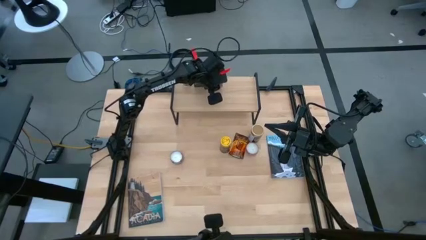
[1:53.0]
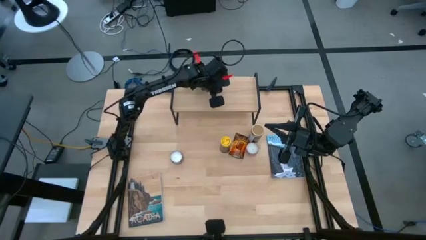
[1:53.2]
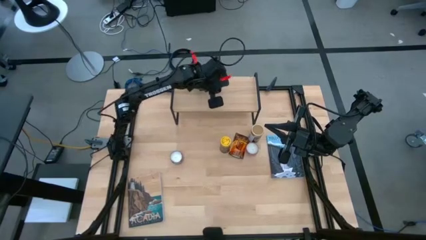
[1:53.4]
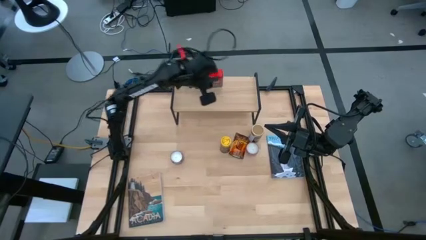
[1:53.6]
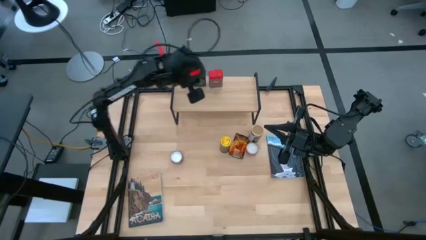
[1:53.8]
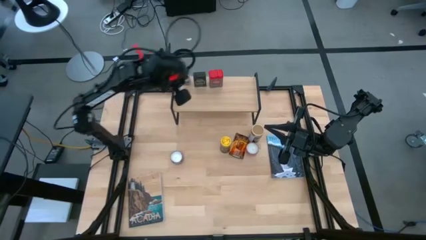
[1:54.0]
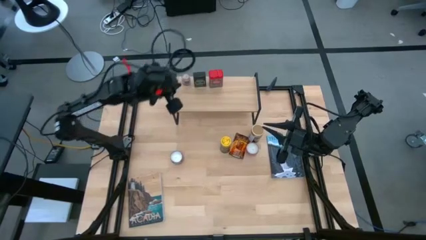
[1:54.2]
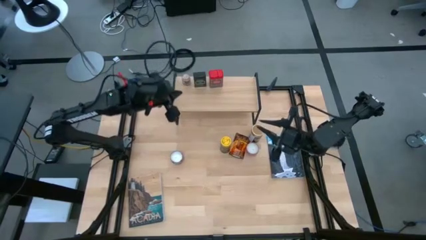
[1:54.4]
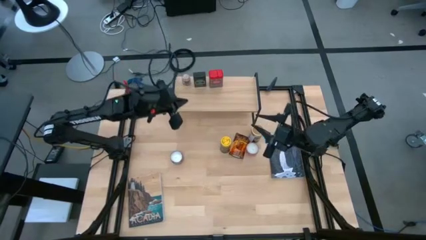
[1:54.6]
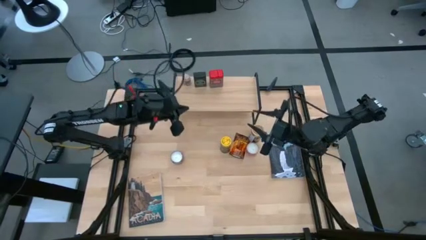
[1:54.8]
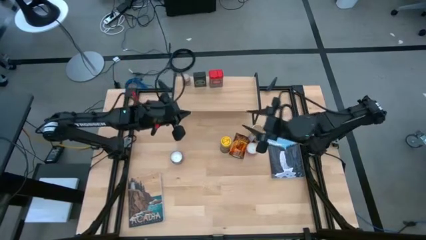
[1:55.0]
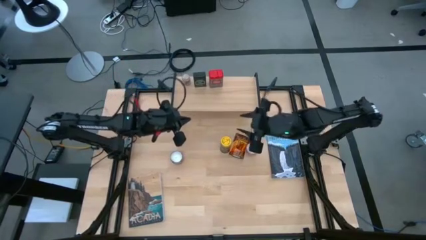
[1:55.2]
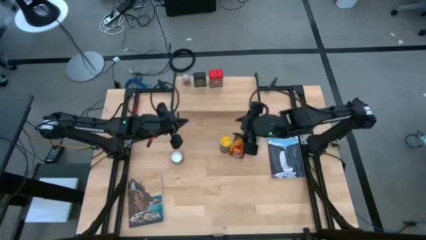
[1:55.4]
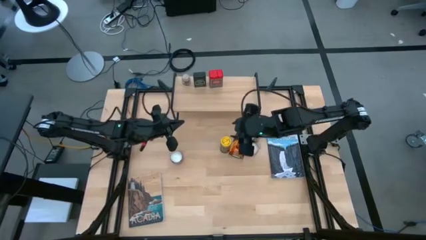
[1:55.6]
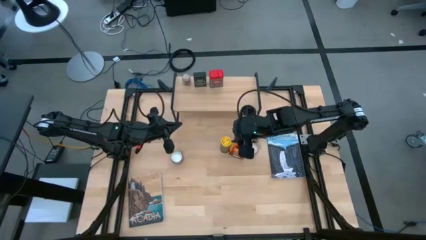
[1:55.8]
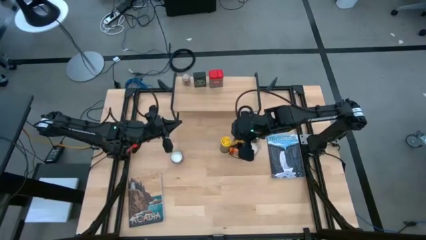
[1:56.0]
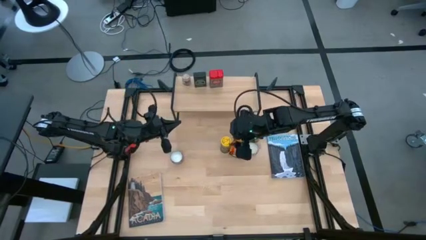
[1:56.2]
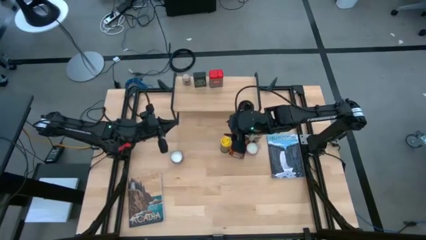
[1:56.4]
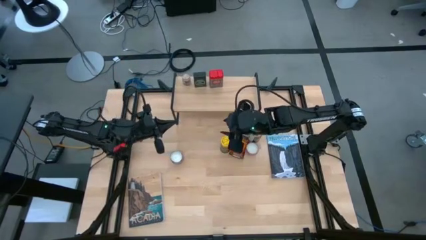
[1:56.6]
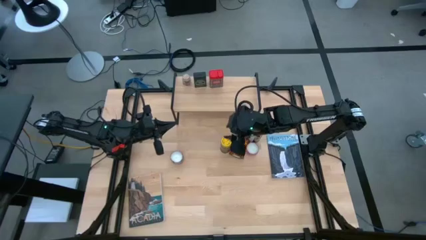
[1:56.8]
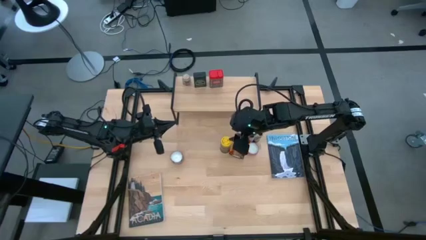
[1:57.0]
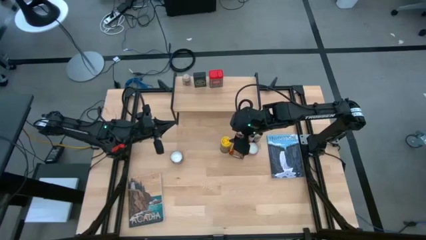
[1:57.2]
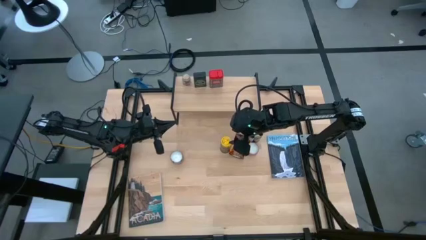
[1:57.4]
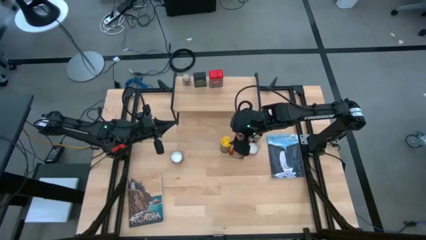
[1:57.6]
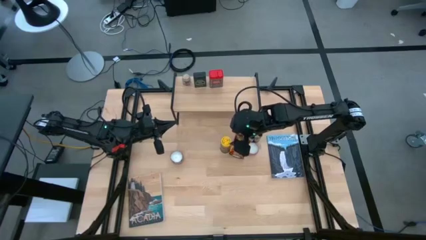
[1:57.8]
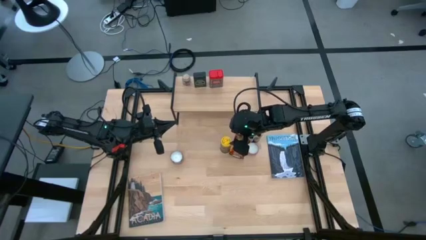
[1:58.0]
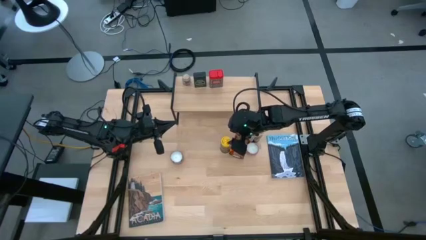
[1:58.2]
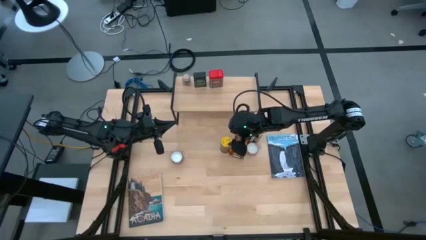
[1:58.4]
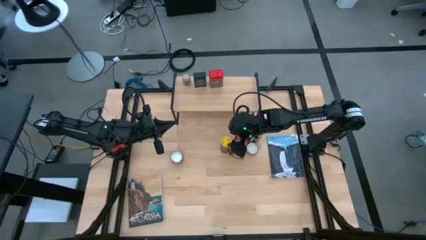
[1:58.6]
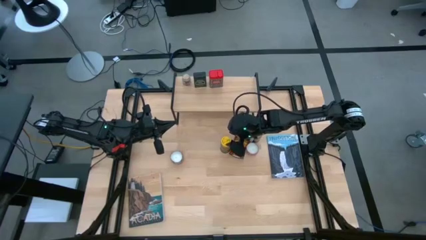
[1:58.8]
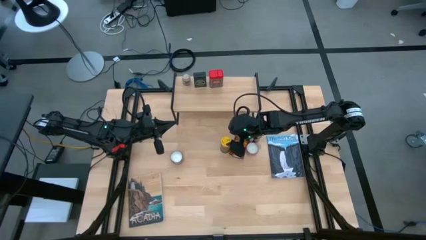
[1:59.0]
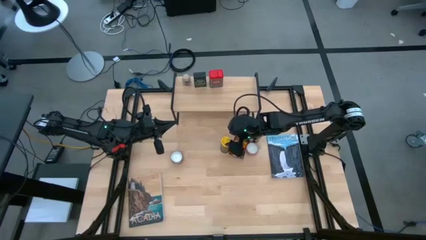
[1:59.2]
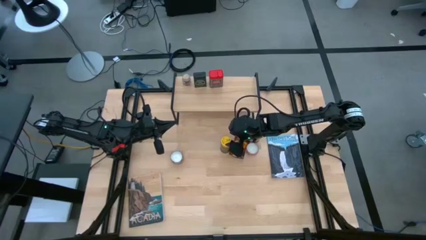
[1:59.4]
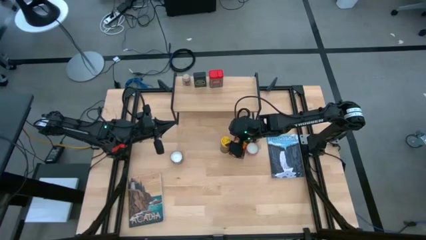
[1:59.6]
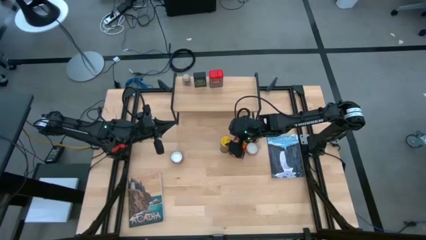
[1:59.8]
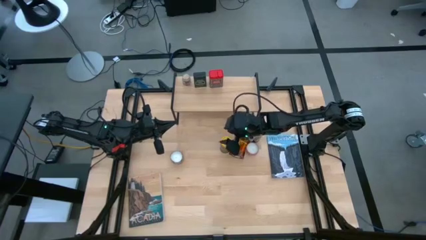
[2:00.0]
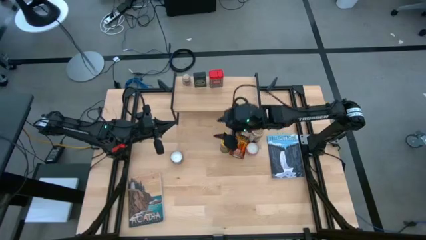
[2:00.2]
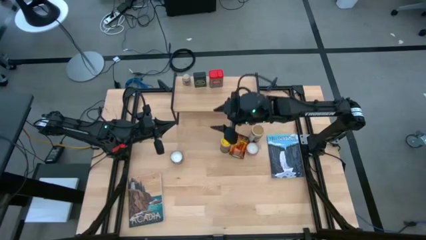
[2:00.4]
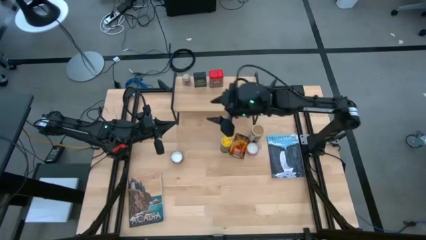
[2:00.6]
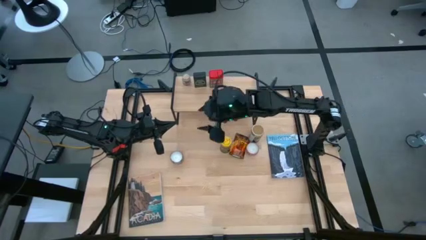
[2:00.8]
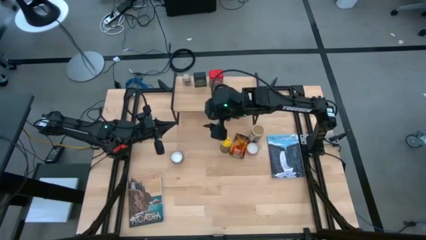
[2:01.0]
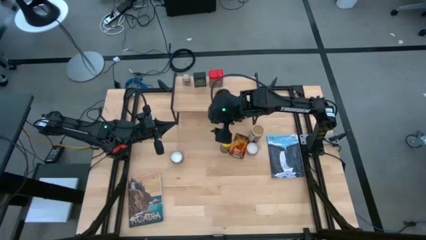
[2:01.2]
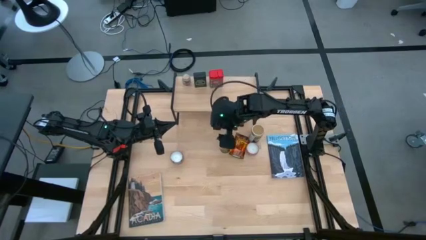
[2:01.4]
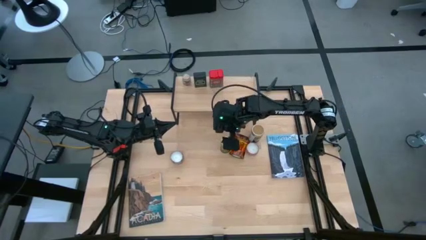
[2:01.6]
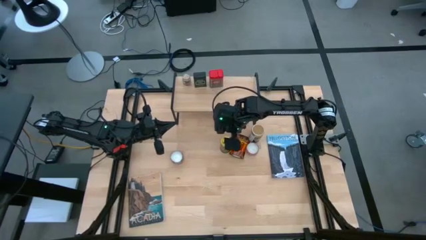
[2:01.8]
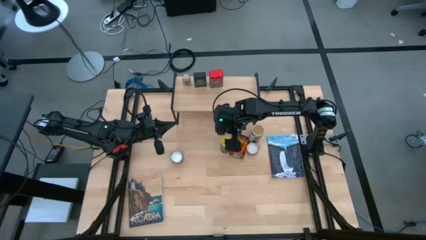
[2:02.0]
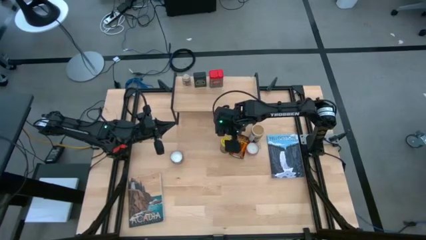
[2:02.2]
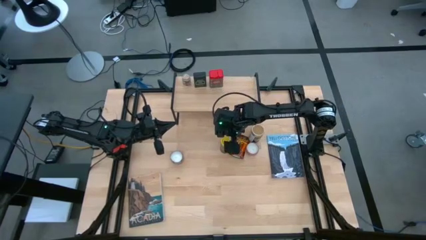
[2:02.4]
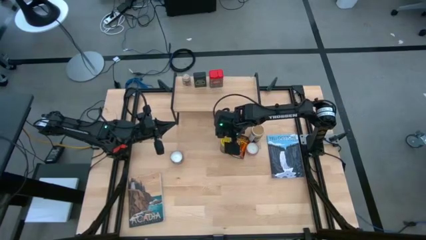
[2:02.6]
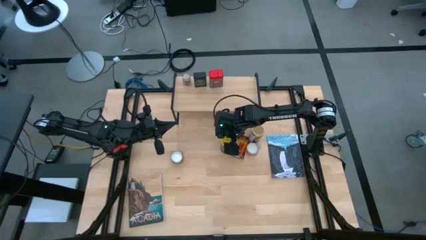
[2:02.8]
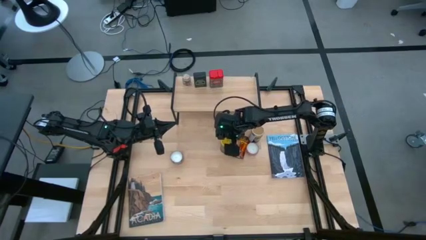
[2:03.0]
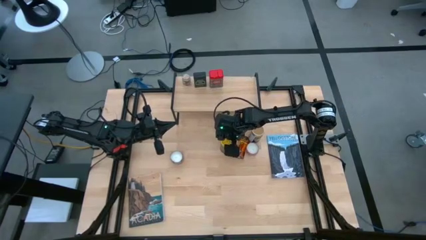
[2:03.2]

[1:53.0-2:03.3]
Task: Shelf spices
Put the yellow seasoning bottle on the shelf

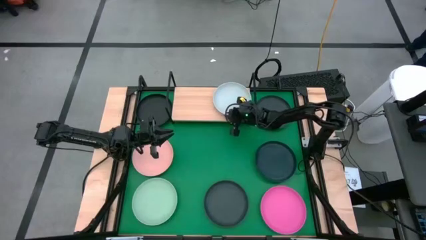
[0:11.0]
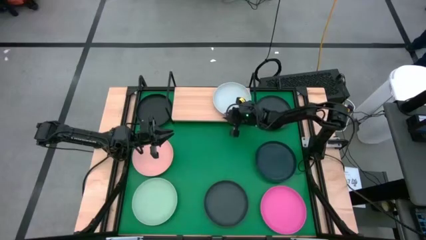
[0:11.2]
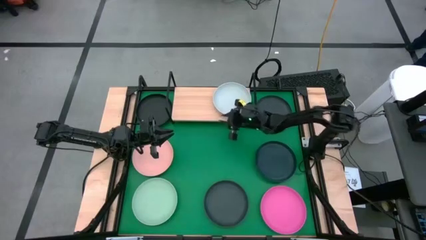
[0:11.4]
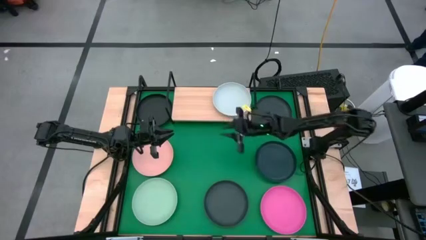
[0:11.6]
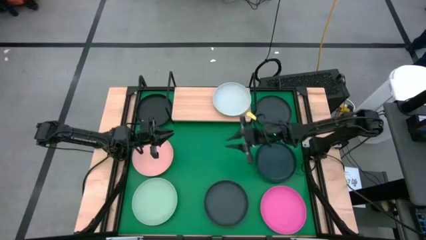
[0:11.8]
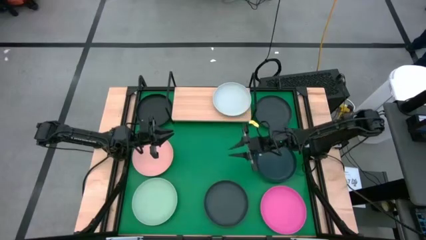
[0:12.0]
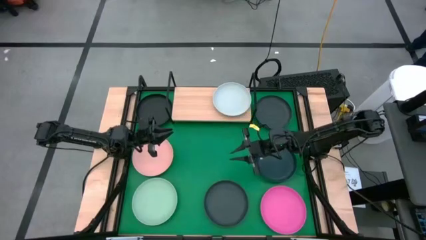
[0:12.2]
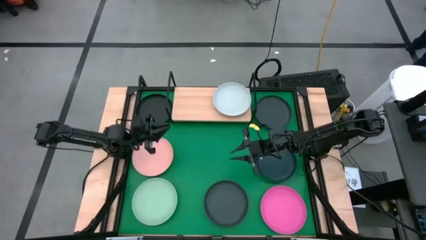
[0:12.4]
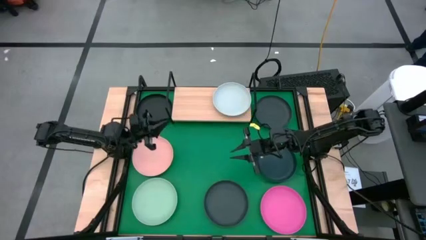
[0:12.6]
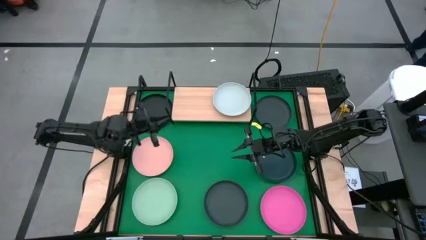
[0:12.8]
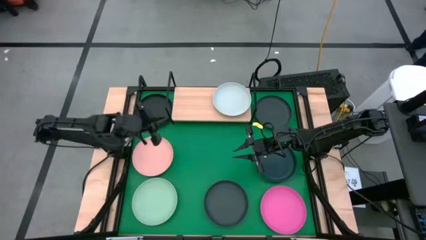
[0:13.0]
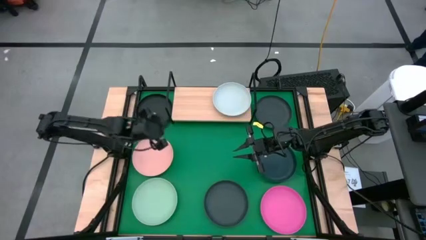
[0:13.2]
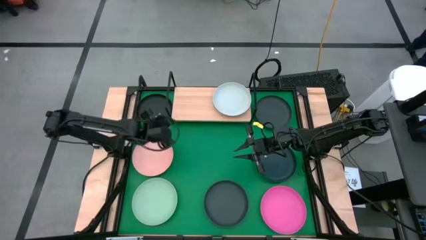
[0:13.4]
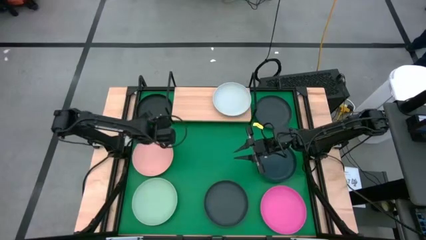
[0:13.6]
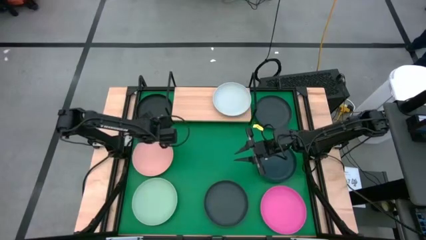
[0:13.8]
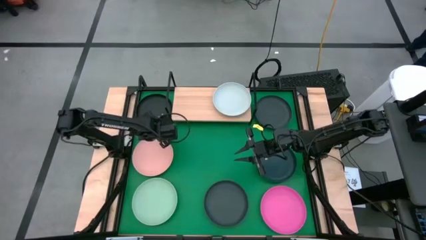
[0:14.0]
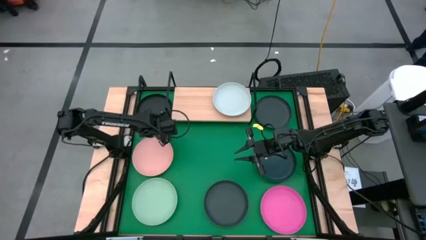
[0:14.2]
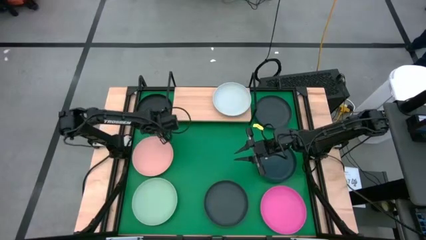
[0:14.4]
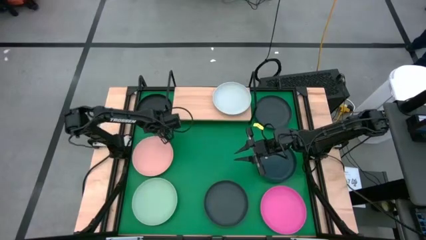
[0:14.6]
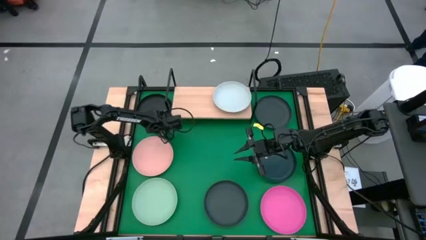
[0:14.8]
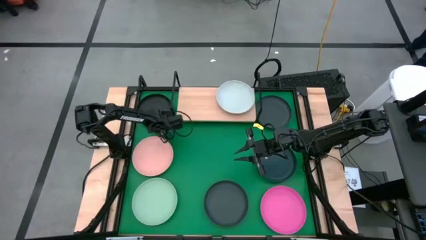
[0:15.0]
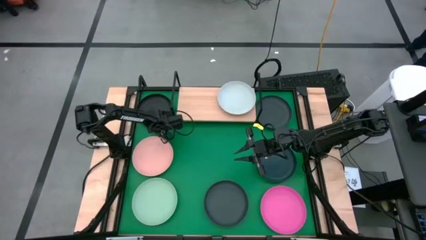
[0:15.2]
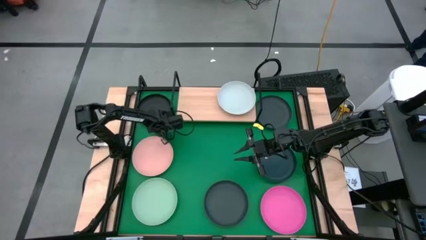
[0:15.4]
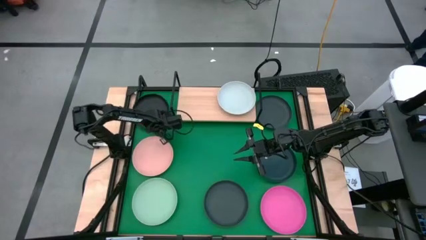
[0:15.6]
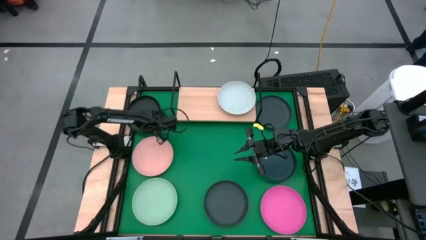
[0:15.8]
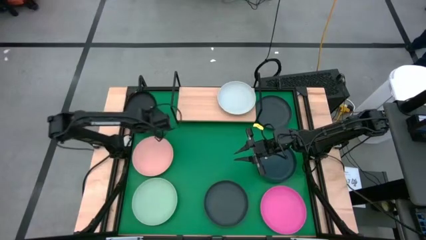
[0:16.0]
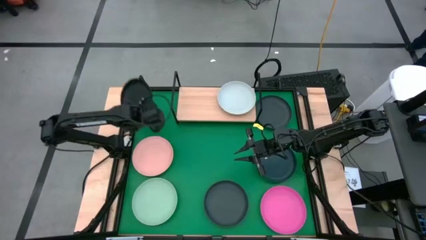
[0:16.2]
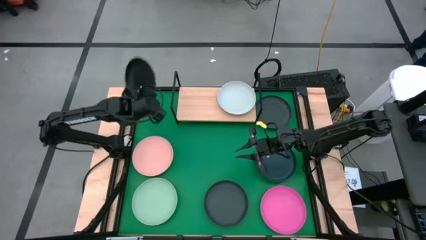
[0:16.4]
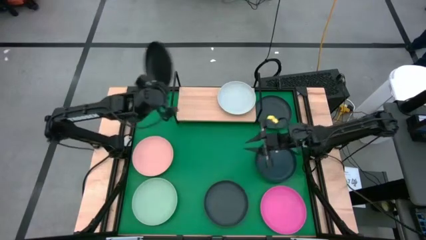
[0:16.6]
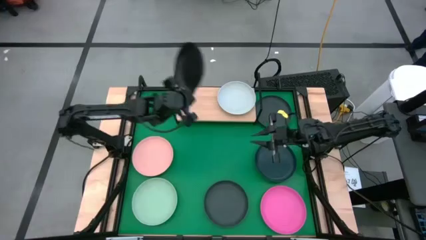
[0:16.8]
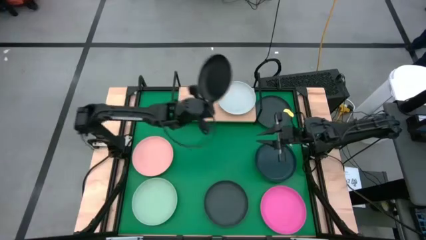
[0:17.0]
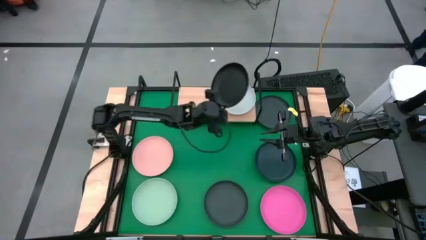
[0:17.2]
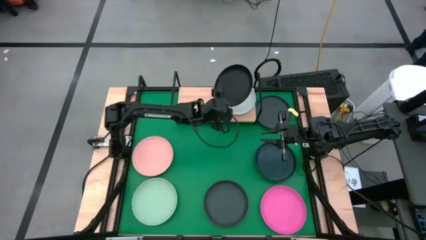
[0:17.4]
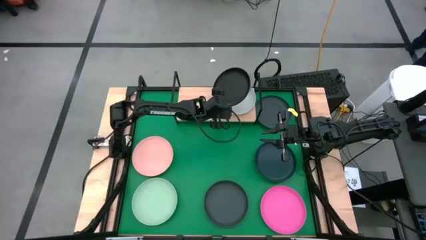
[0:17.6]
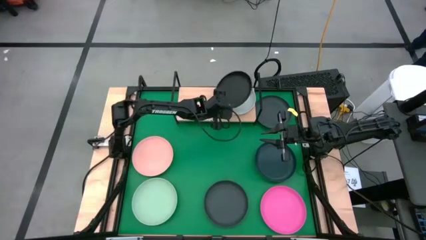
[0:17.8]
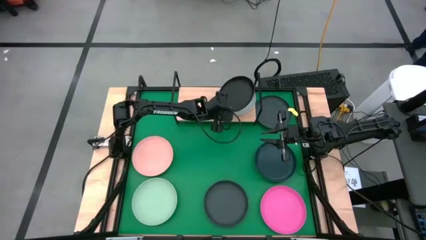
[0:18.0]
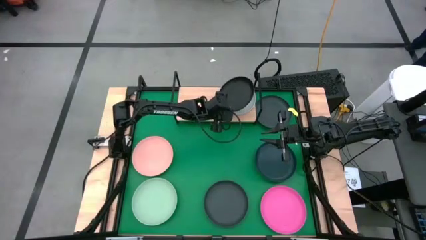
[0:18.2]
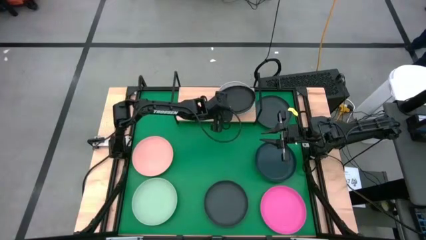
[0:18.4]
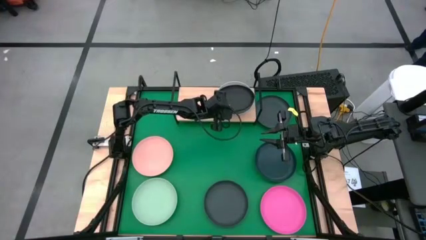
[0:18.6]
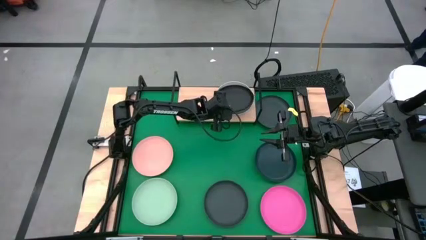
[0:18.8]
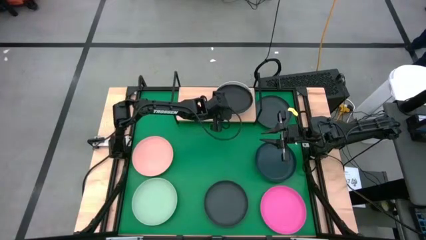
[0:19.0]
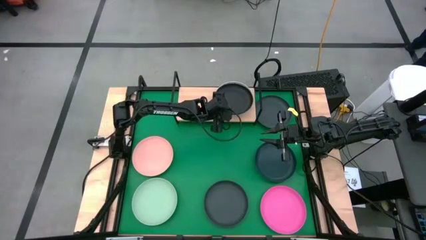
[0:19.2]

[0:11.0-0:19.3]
Task: Place and stack plates onto a shelf
Stack the top left black plate on top of the white plate on the shelf
